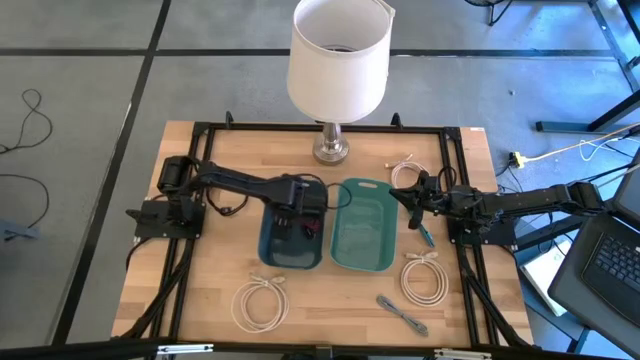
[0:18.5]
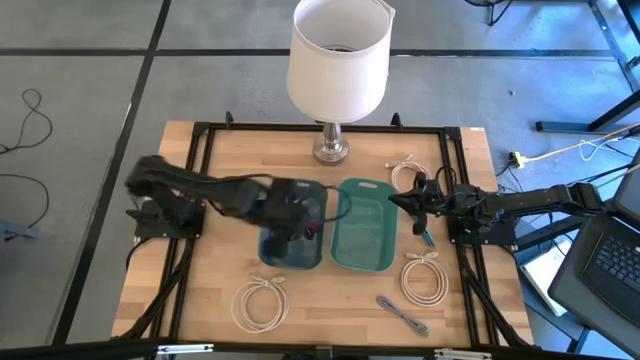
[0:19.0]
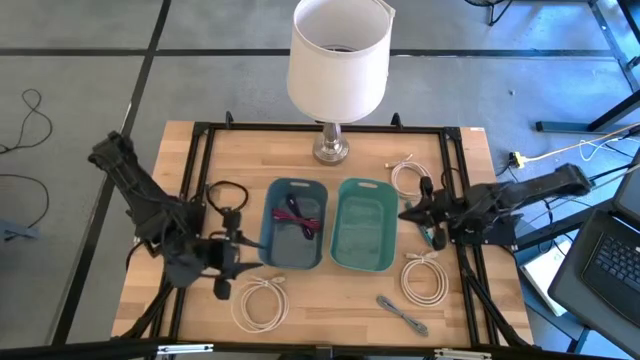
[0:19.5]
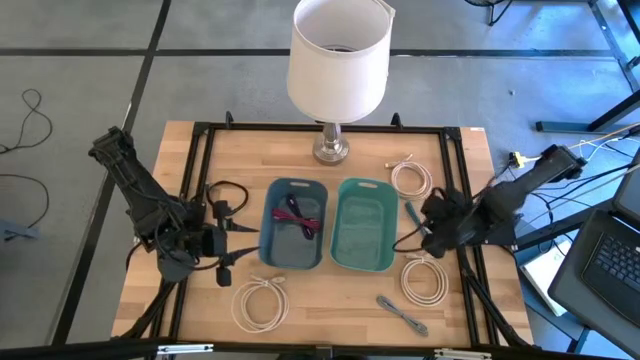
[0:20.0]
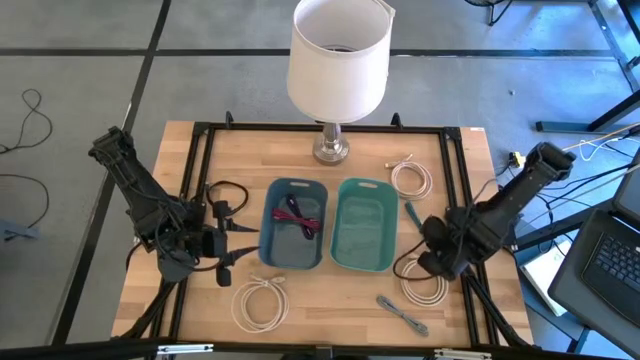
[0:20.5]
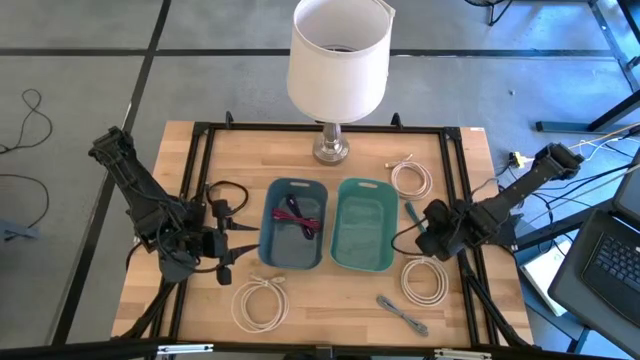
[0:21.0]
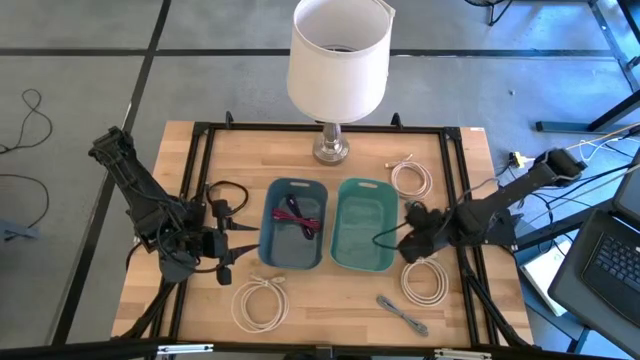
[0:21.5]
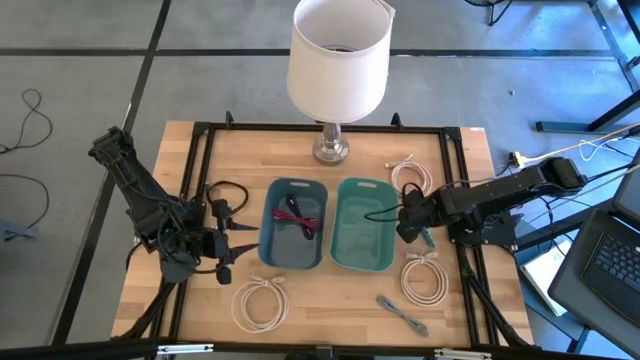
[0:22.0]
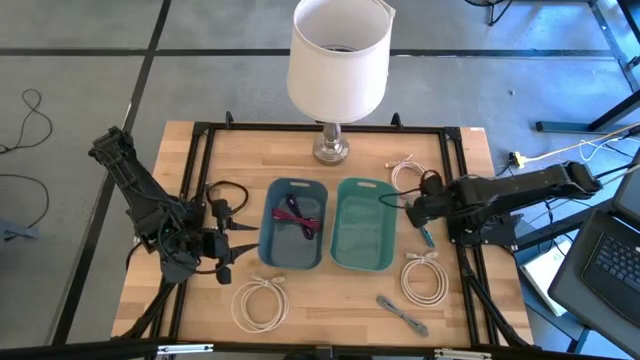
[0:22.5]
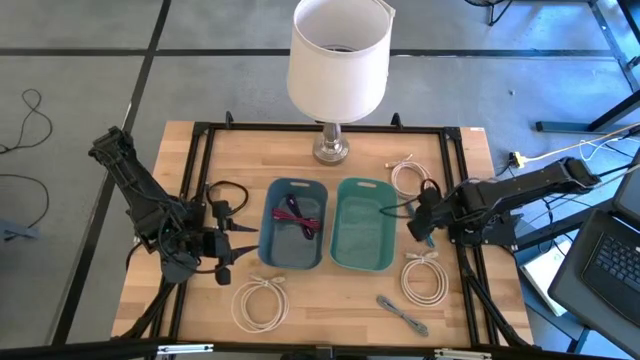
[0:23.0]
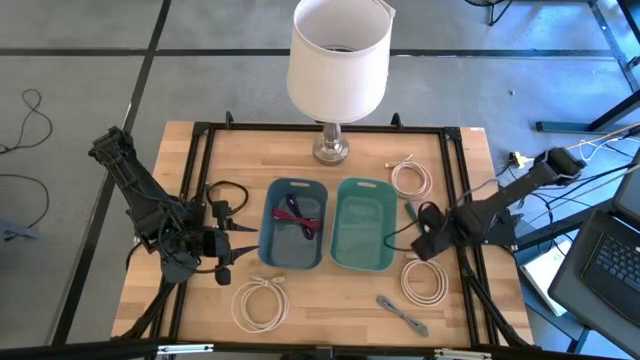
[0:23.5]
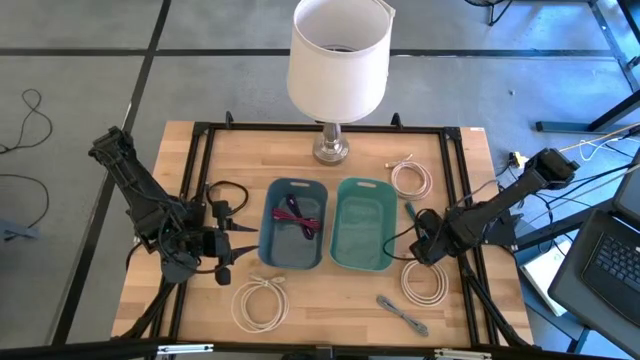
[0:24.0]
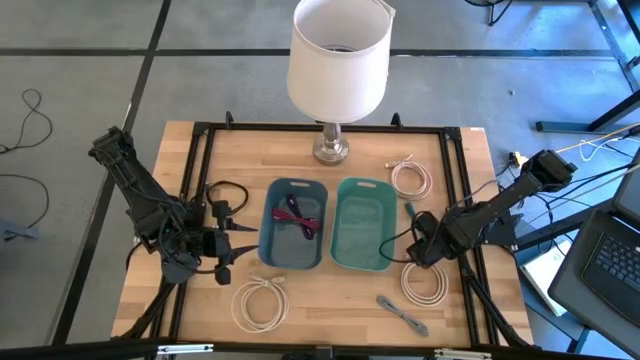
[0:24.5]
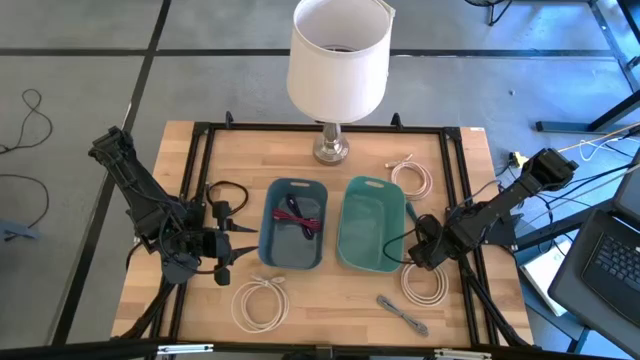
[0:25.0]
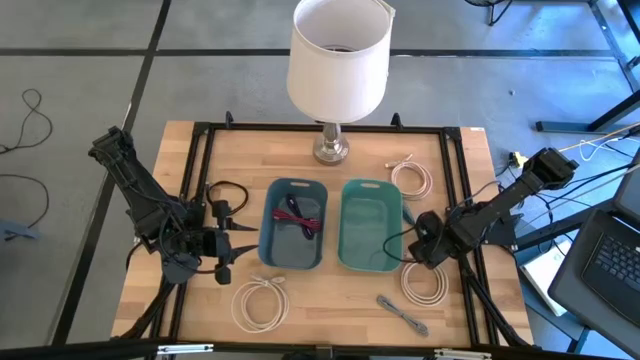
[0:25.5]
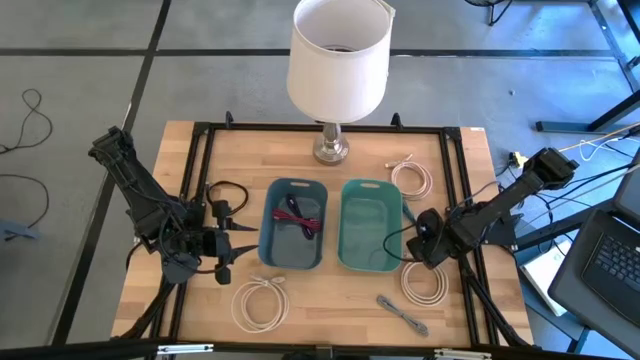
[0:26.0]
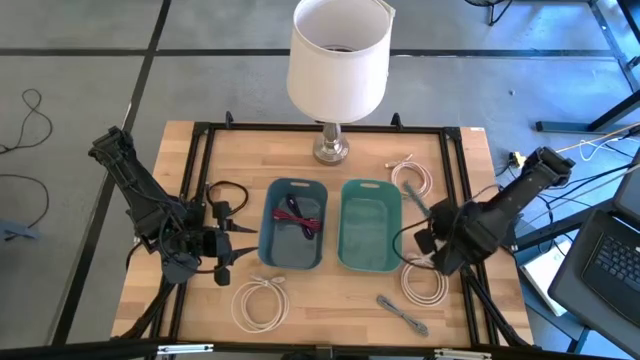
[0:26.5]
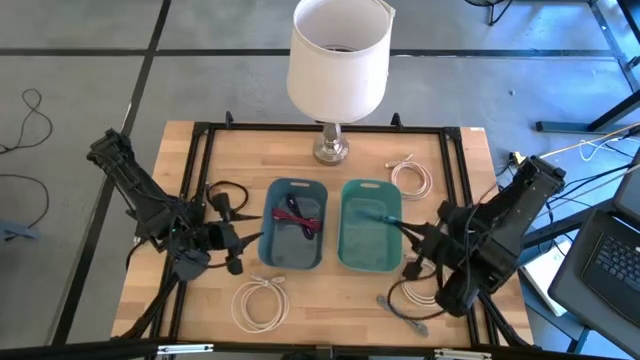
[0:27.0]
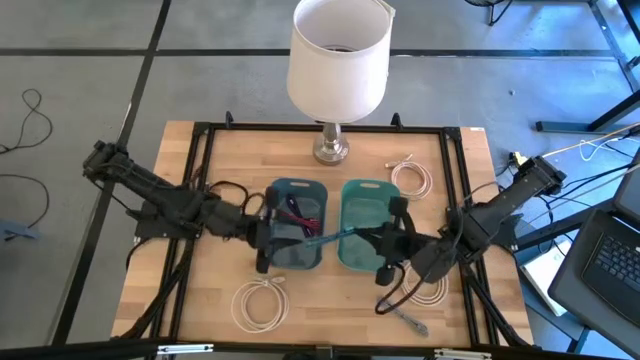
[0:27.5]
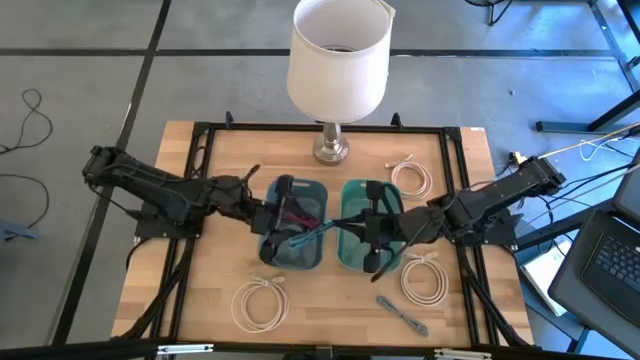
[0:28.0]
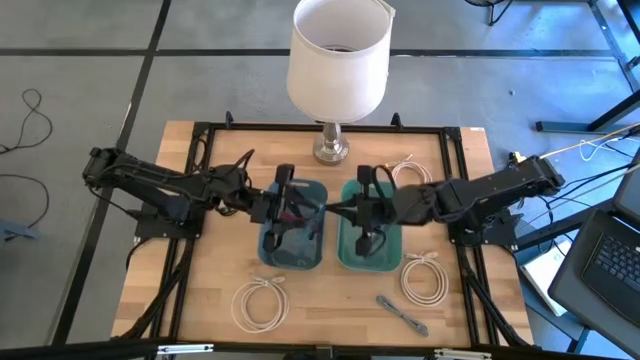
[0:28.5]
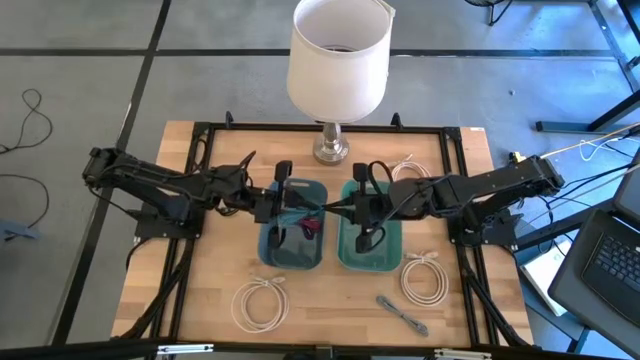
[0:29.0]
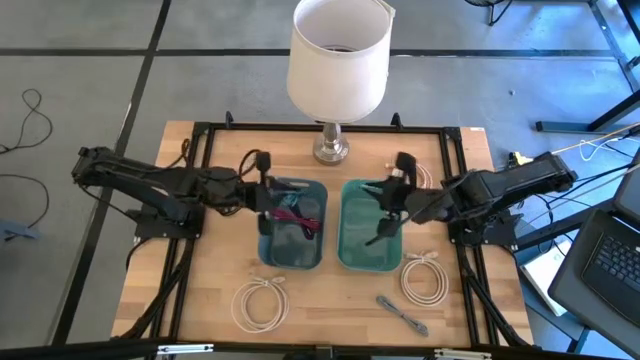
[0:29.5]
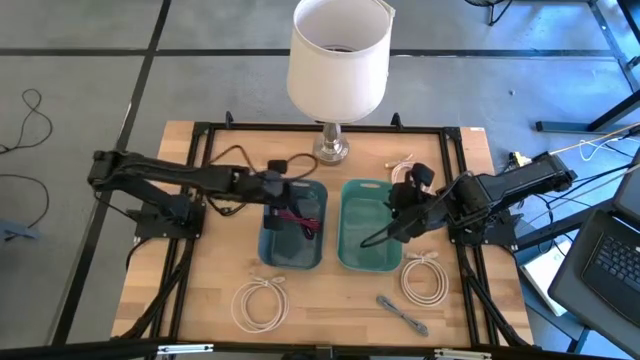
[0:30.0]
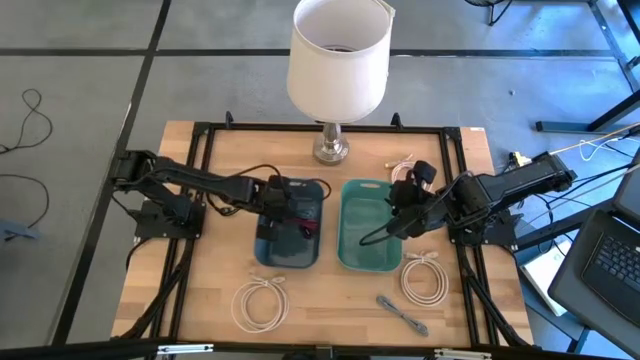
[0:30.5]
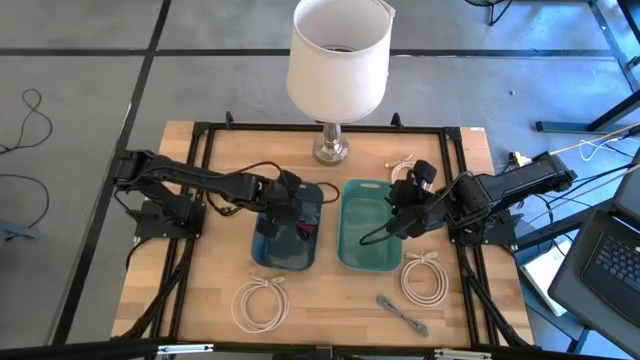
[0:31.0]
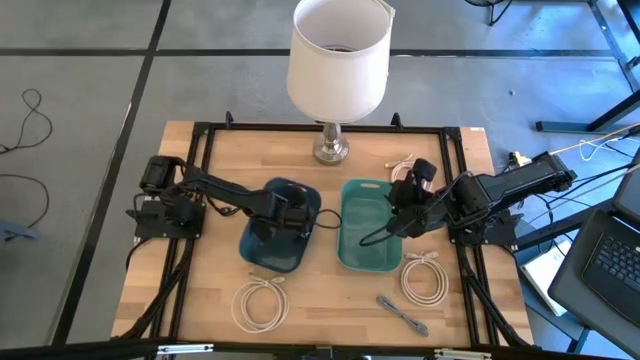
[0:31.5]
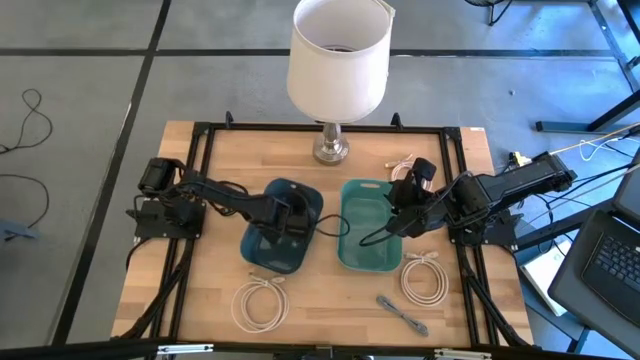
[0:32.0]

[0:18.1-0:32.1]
Task: Pick and place items into bin
Put the blue patterned USB cable into the blue bin

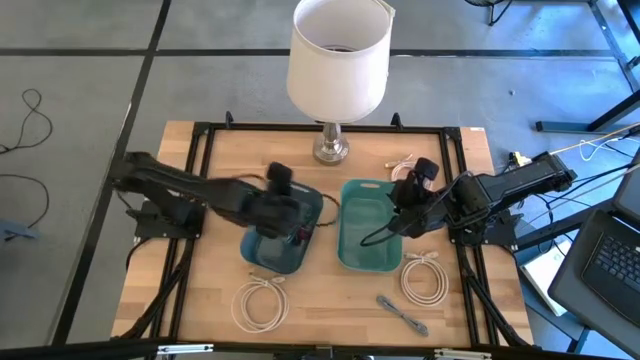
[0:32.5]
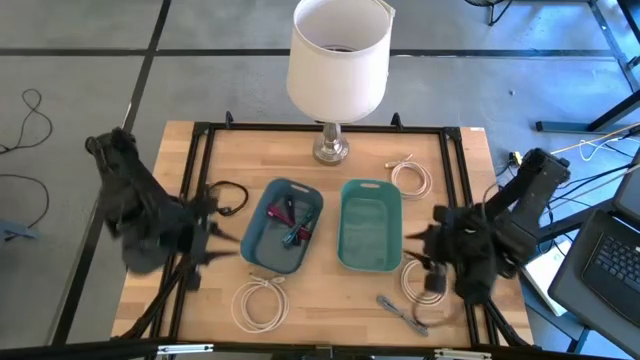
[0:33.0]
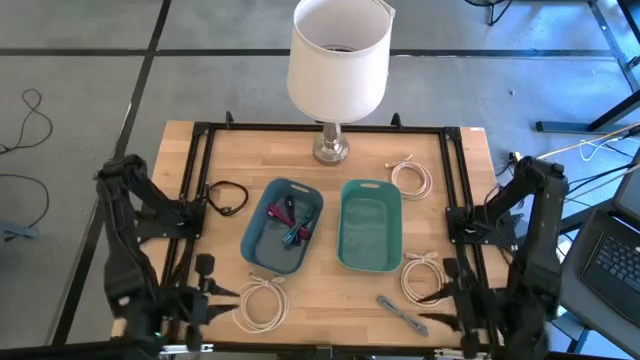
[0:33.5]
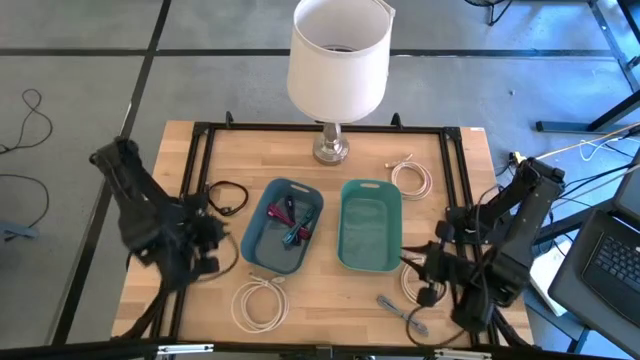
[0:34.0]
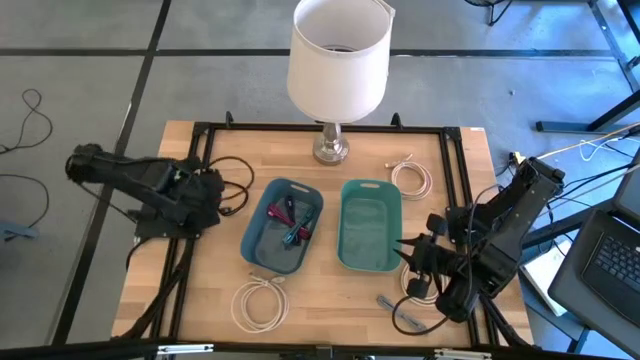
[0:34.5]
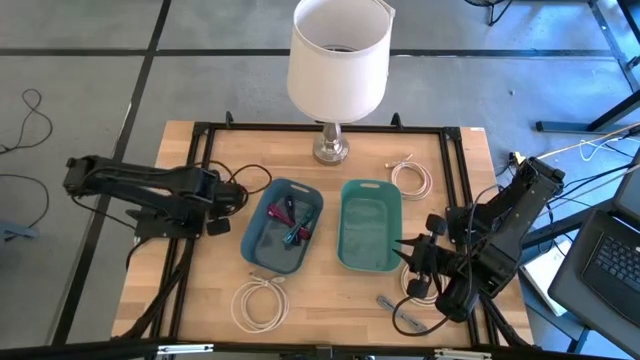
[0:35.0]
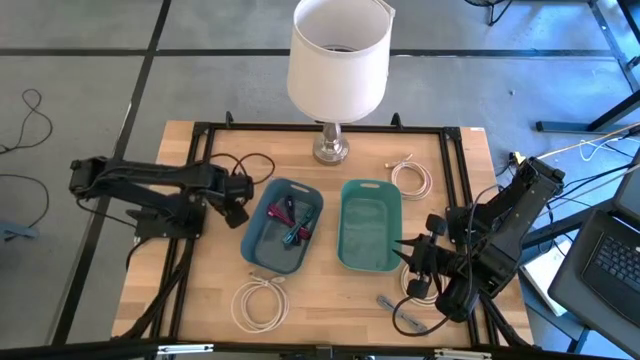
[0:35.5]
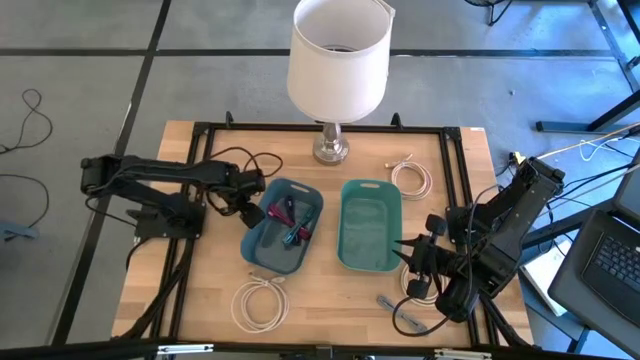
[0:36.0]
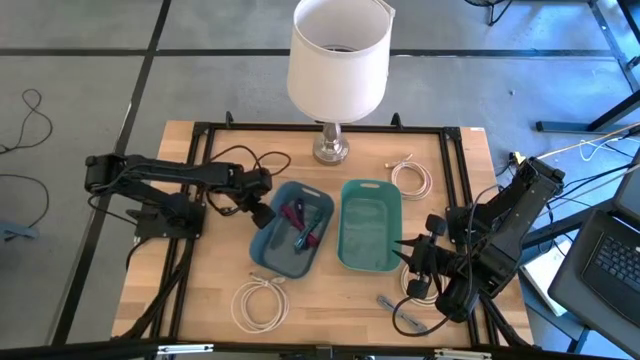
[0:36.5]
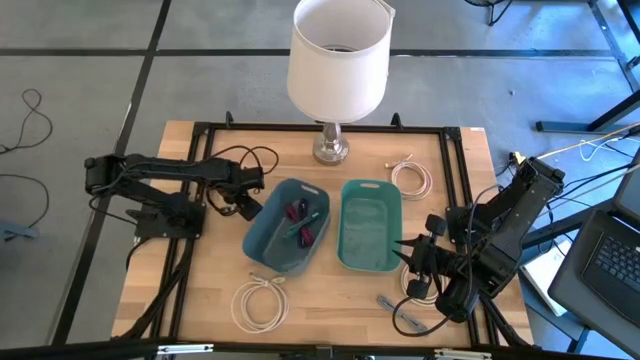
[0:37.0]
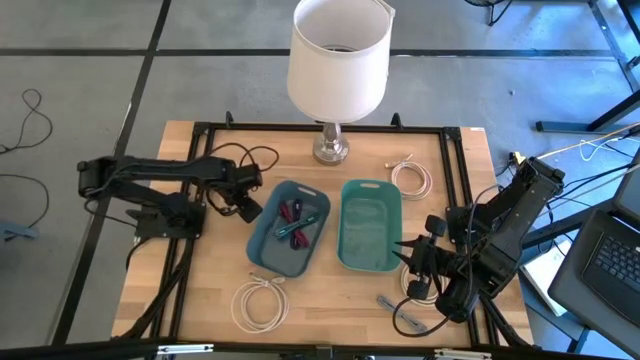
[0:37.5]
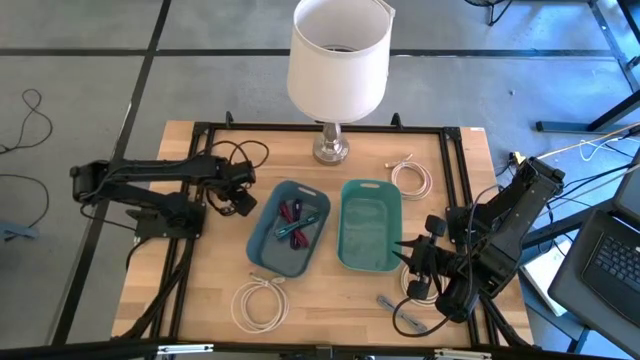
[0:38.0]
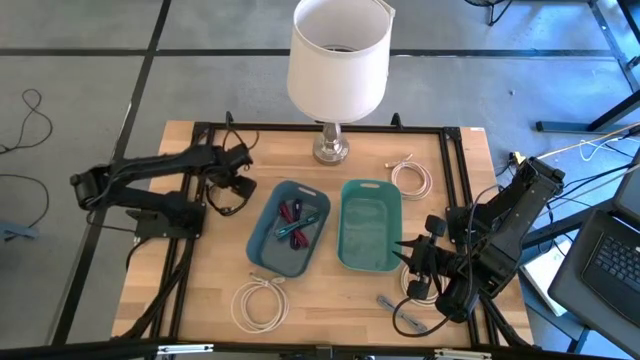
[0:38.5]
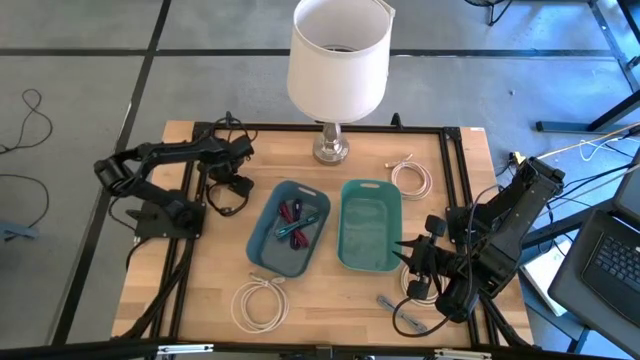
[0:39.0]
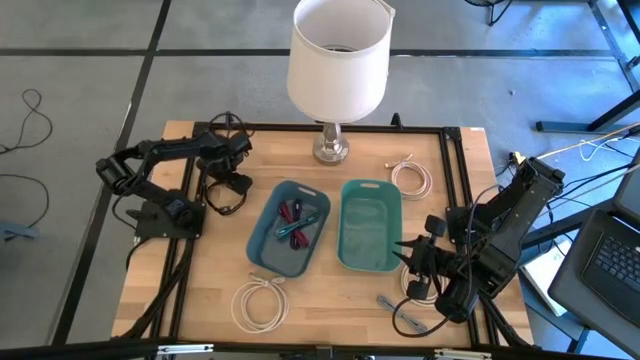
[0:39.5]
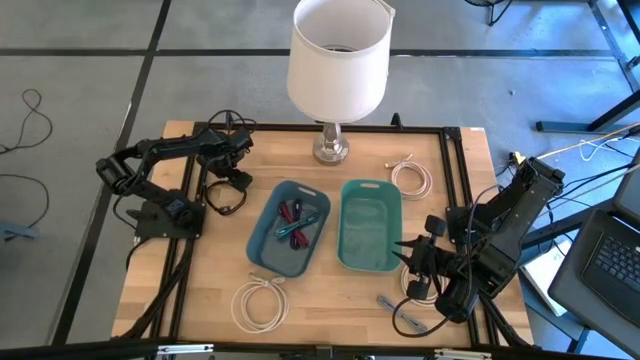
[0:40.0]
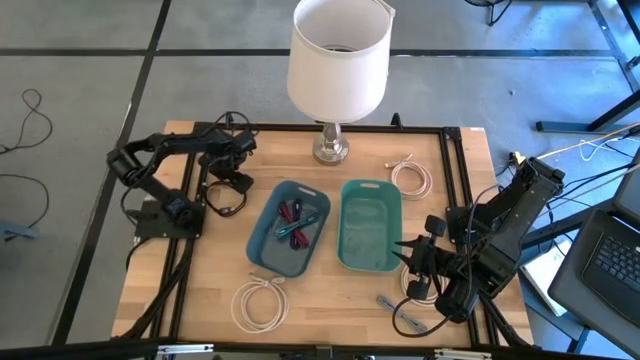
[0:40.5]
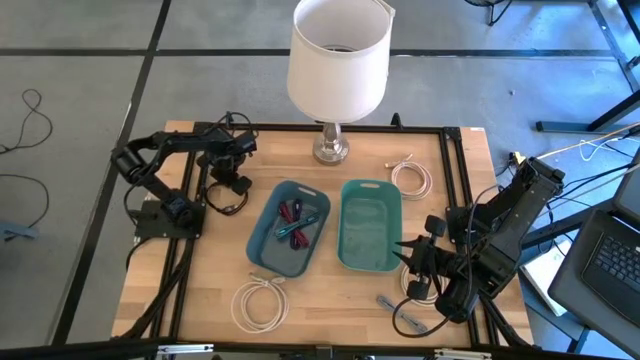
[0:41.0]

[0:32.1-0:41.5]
Put the black charger cable into the green bin
